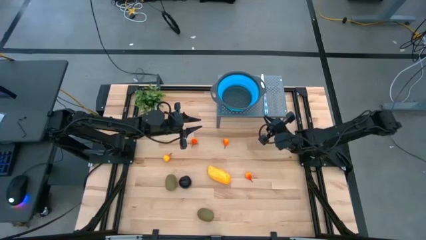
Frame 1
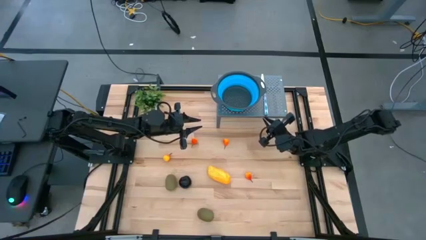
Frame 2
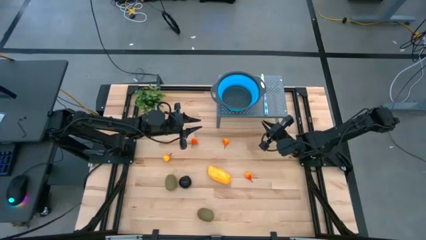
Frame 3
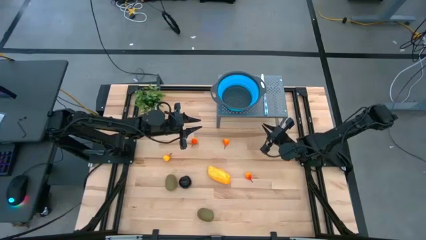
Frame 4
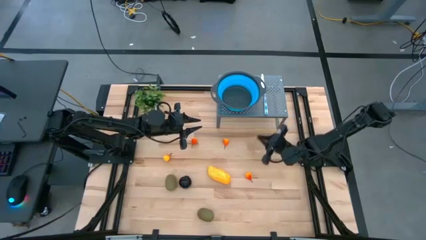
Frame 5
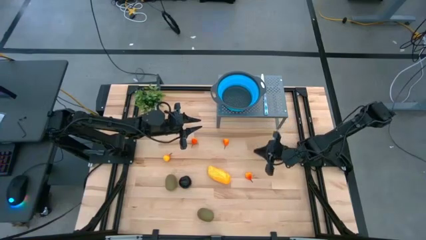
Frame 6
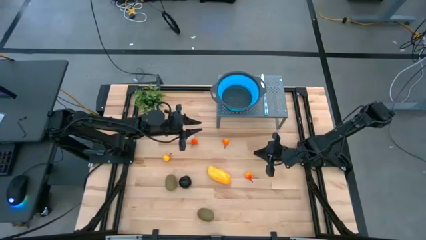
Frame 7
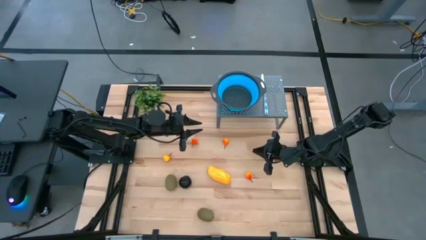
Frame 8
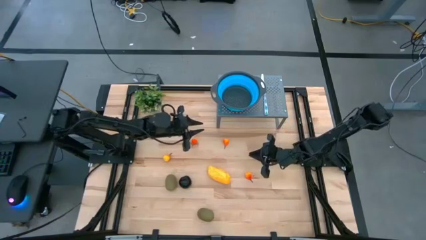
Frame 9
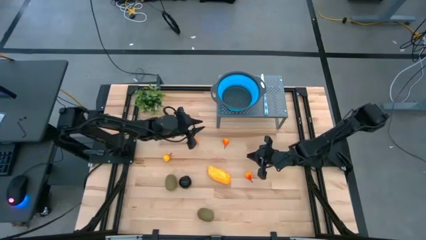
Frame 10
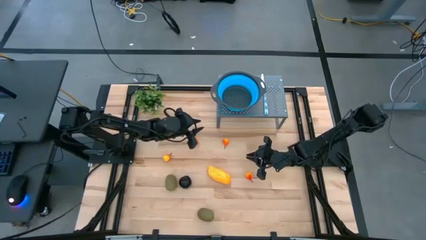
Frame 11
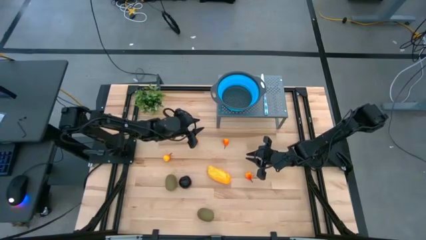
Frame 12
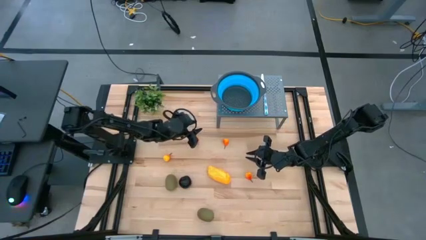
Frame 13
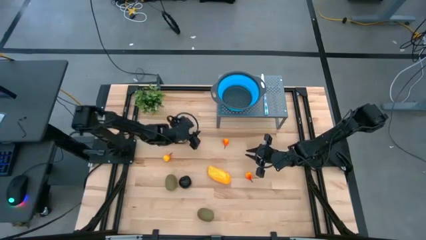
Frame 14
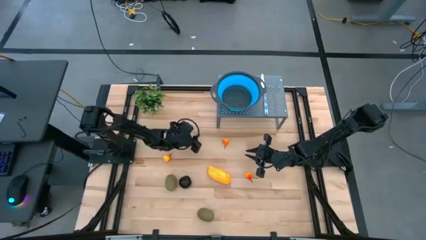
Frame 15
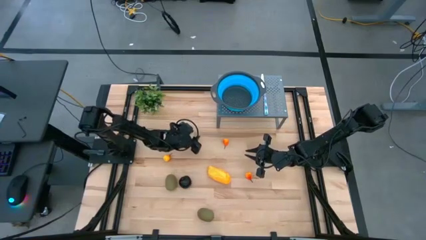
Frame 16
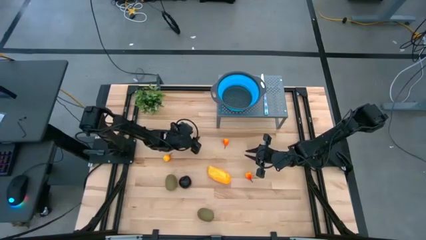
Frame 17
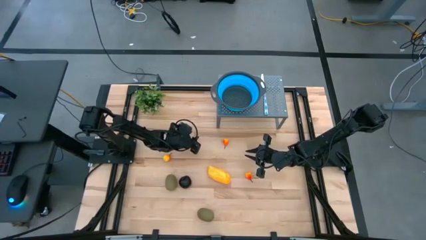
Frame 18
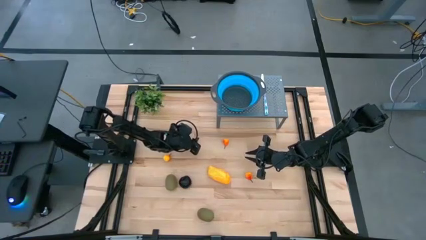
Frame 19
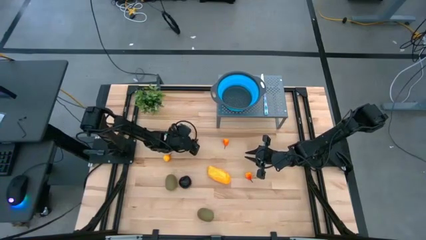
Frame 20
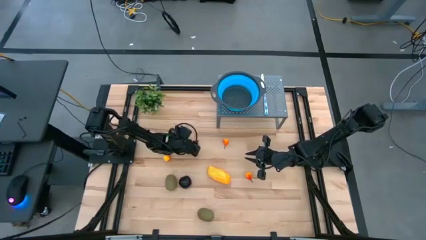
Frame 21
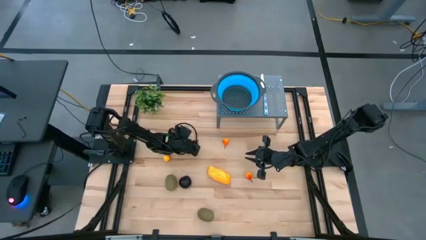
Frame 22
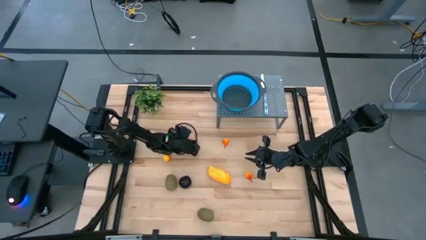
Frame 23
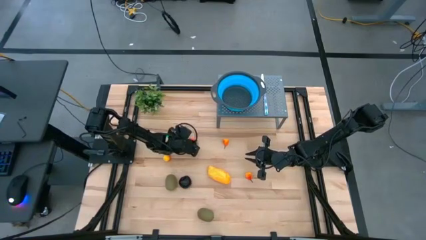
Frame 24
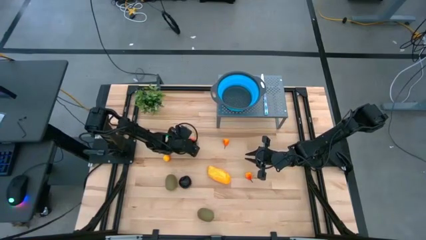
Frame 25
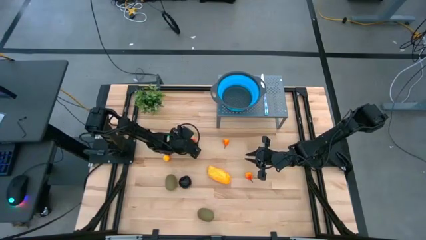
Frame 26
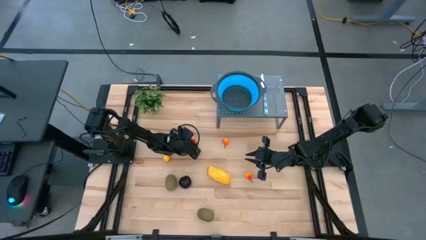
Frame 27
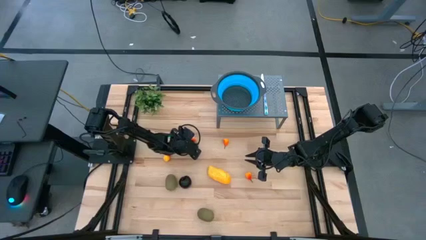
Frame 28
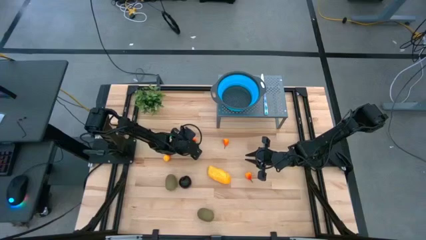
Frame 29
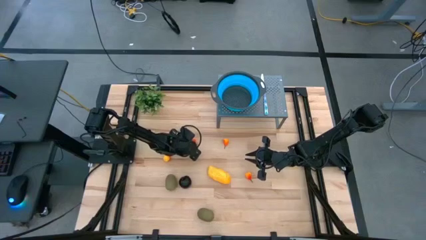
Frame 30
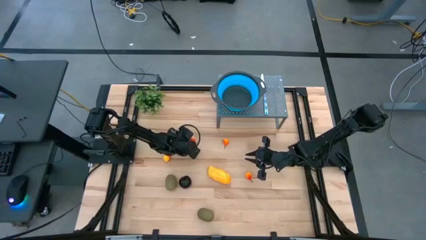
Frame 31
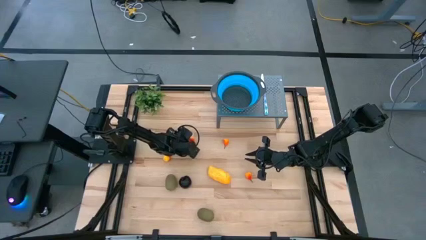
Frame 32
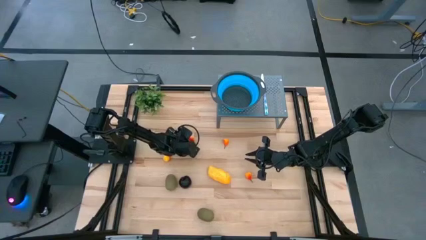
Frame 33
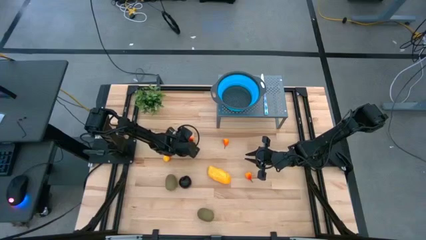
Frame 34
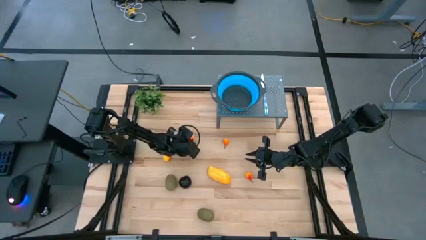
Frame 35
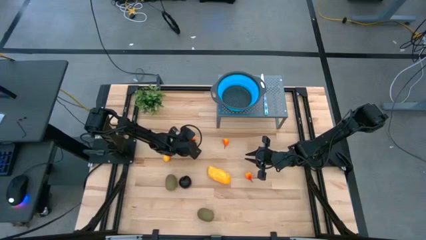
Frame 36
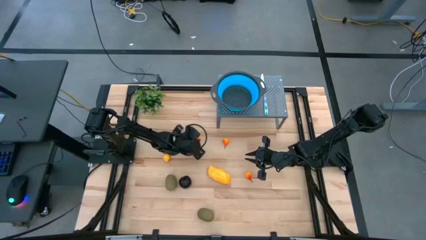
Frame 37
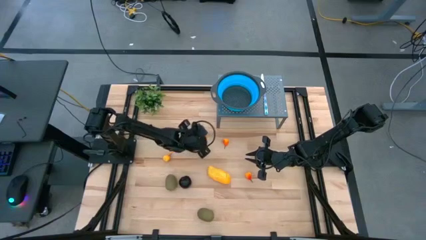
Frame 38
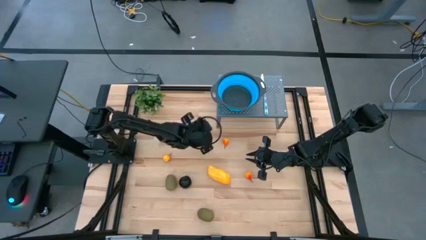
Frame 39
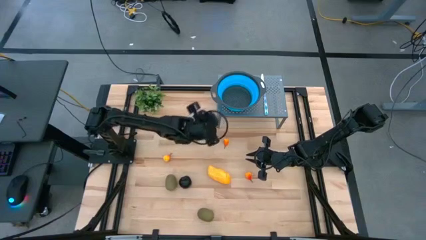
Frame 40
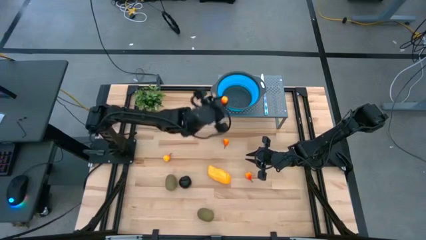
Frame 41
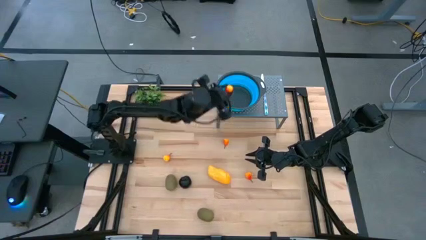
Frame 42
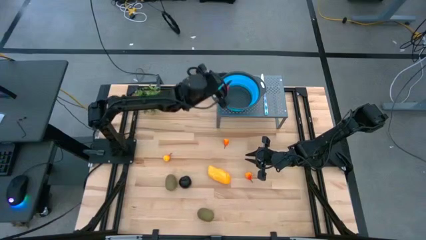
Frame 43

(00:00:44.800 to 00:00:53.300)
Task: Pick & Place Fruit
Put the yellow peach into the blue strainer bowl

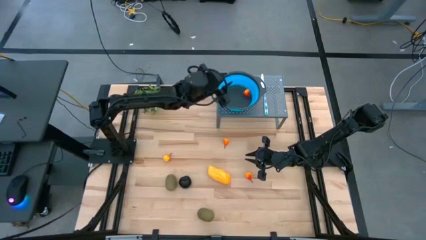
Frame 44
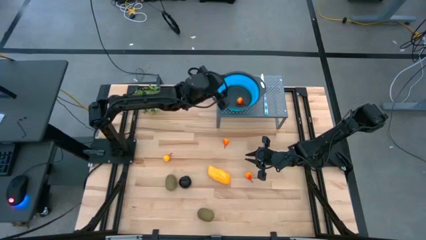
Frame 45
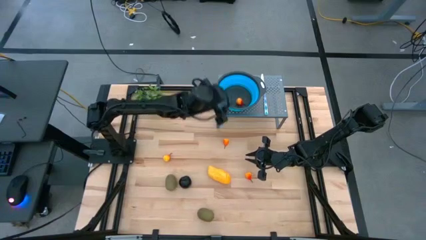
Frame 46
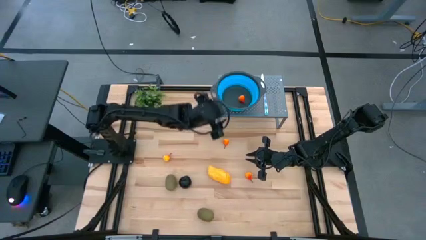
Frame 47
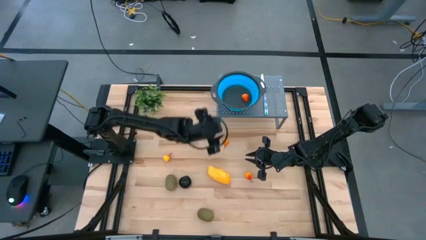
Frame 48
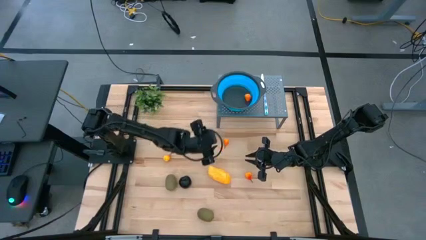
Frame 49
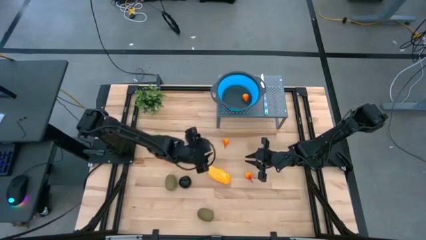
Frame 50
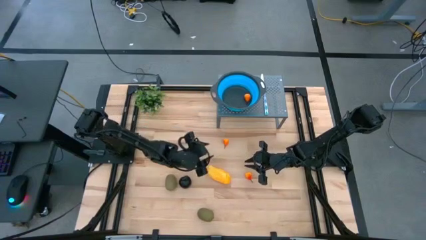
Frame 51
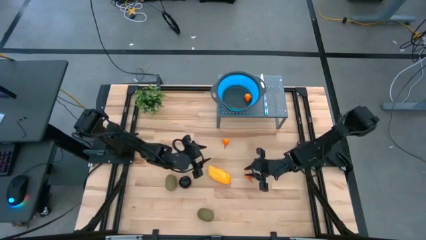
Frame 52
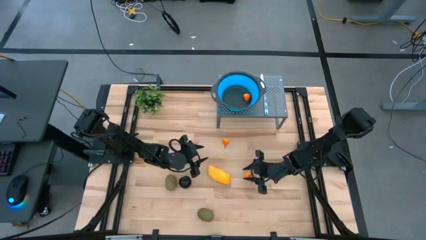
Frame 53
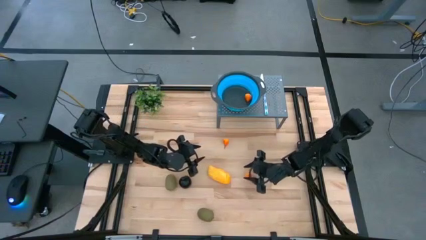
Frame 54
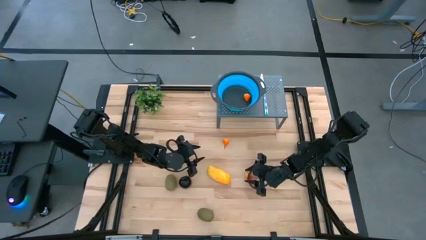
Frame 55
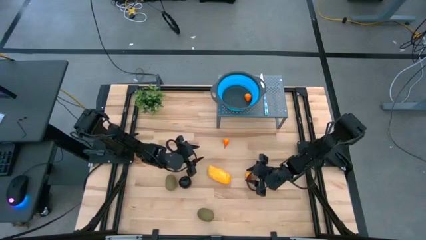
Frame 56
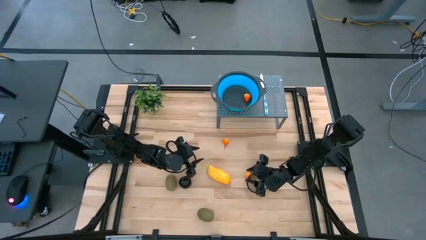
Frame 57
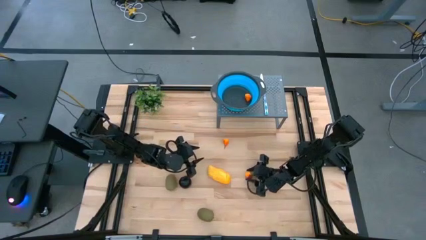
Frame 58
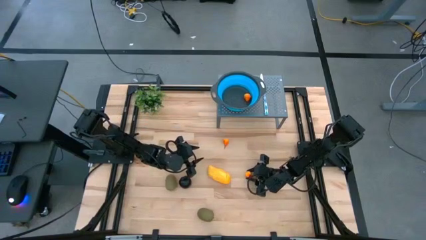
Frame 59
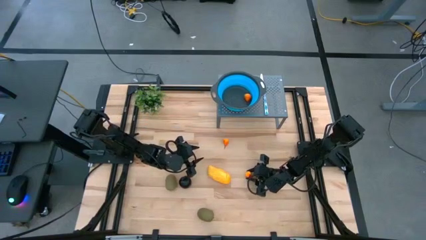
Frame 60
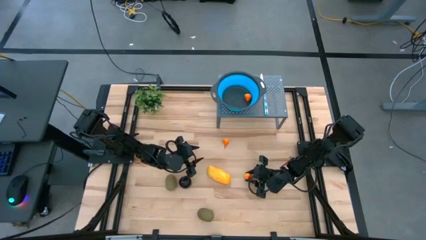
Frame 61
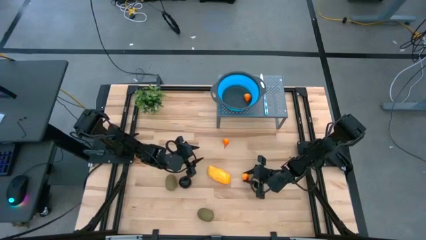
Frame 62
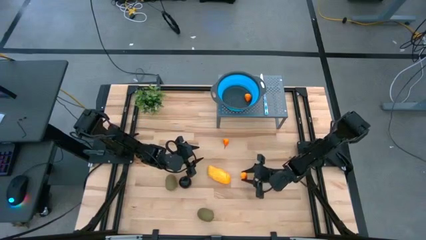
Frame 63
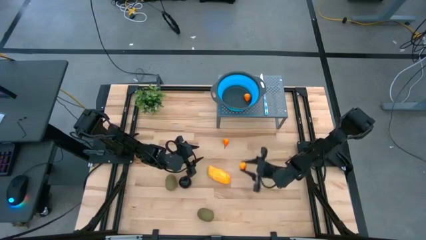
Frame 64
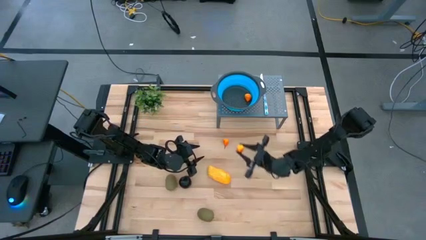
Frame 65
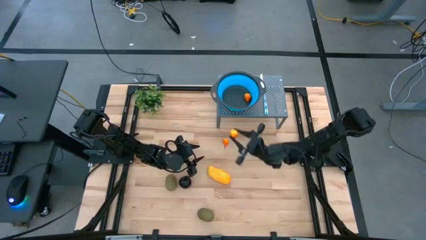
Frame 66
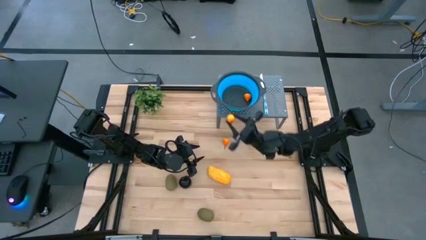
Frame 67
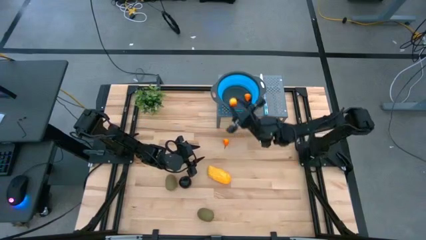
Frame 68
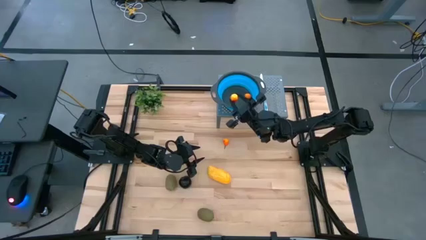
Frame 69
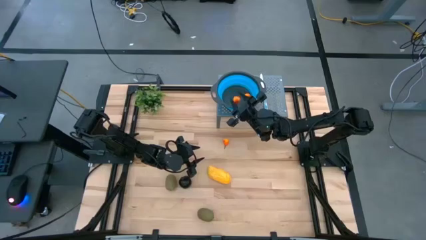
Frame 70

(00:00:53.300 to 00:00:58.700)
Put the yellow peach into the blue strainer bowl
